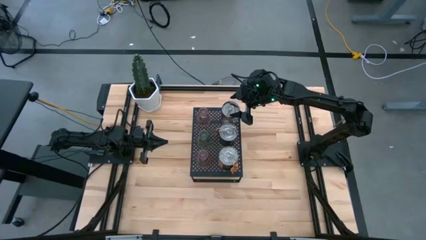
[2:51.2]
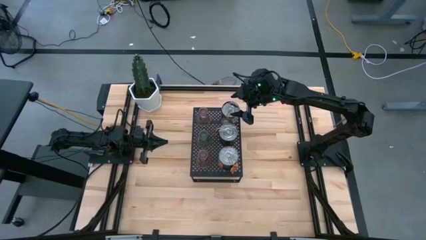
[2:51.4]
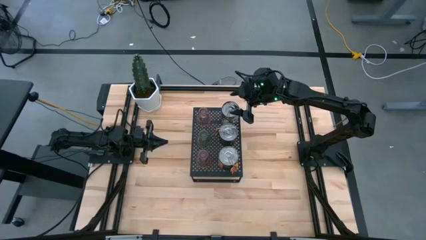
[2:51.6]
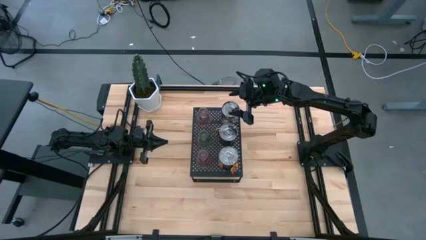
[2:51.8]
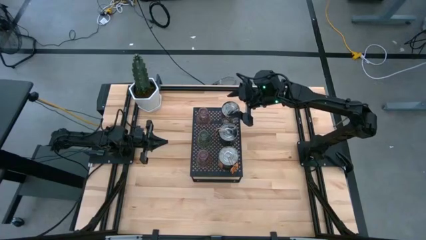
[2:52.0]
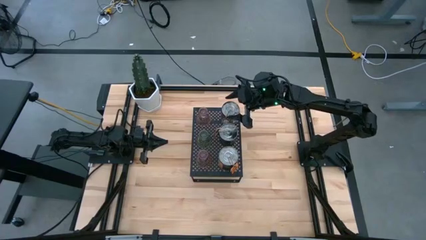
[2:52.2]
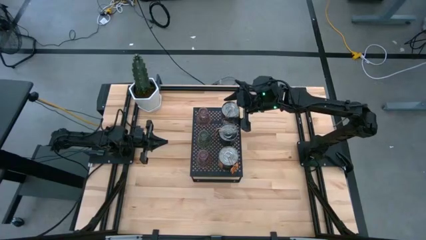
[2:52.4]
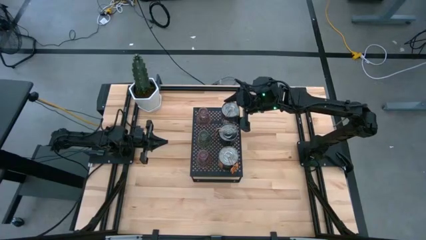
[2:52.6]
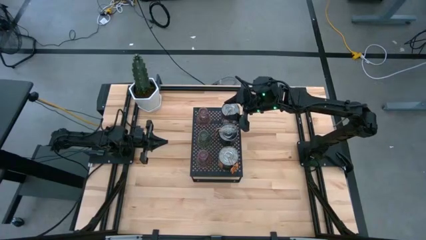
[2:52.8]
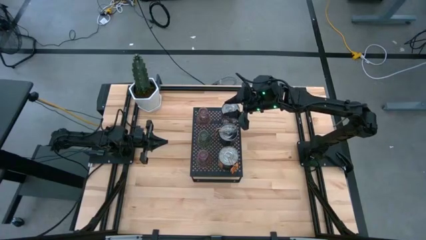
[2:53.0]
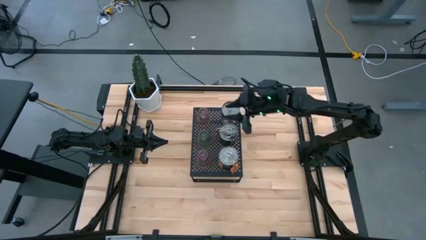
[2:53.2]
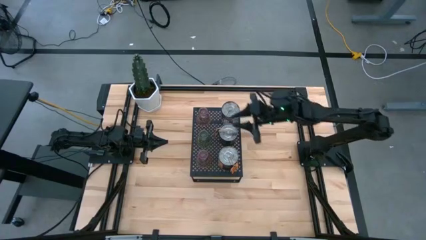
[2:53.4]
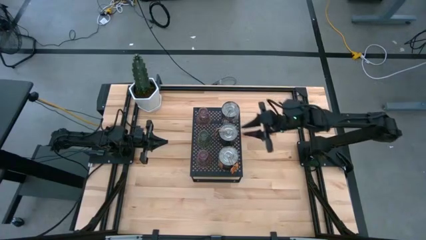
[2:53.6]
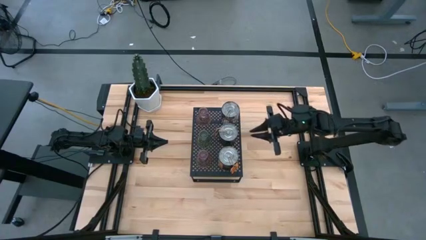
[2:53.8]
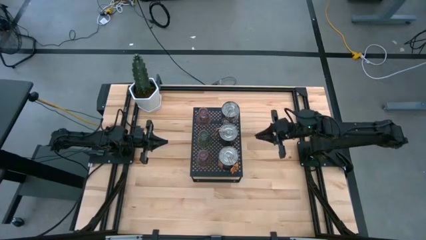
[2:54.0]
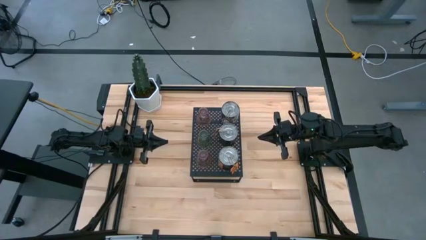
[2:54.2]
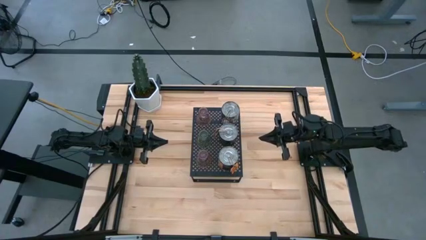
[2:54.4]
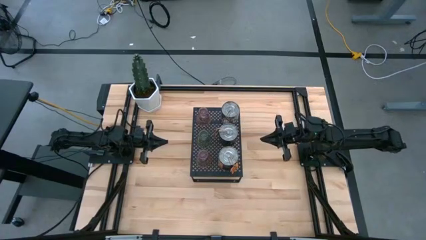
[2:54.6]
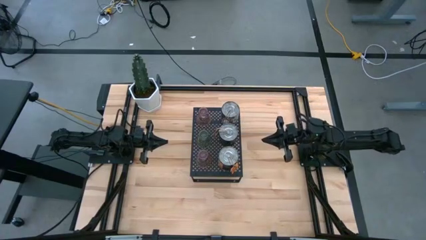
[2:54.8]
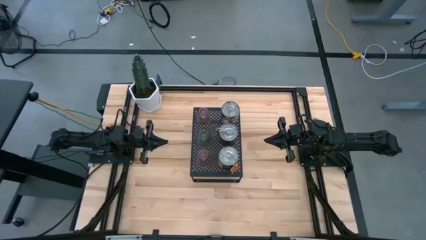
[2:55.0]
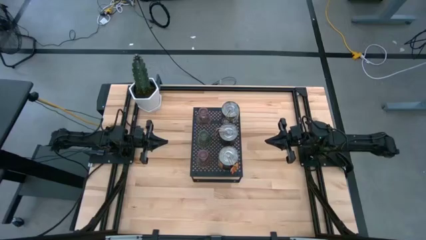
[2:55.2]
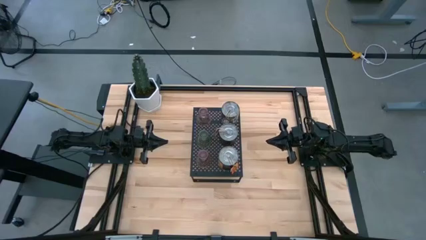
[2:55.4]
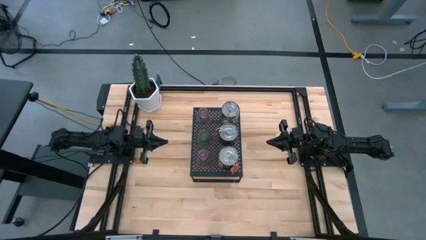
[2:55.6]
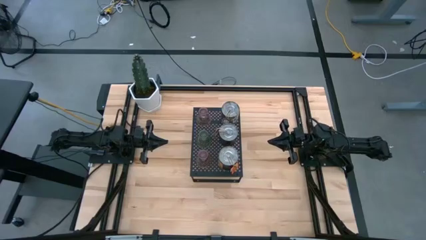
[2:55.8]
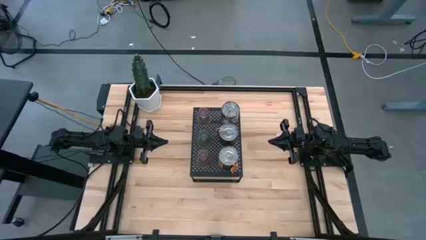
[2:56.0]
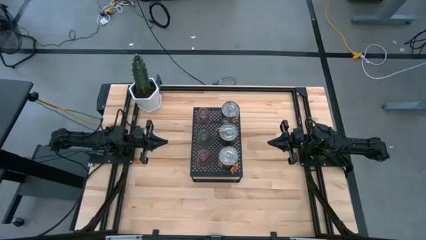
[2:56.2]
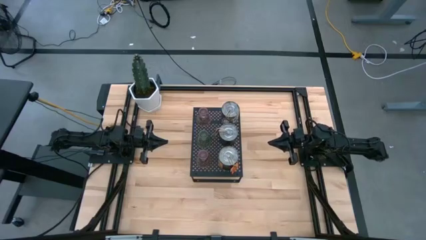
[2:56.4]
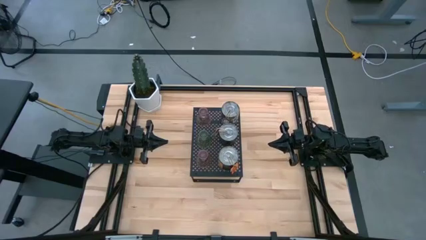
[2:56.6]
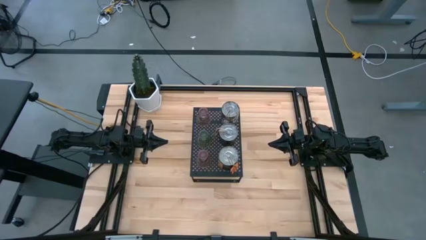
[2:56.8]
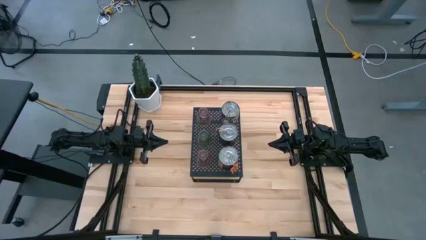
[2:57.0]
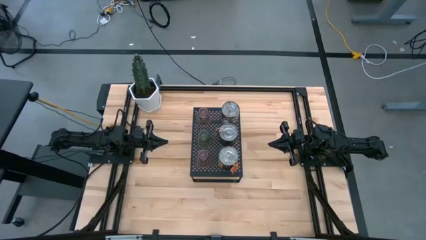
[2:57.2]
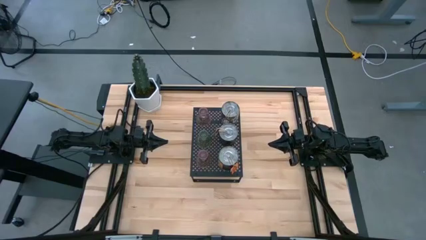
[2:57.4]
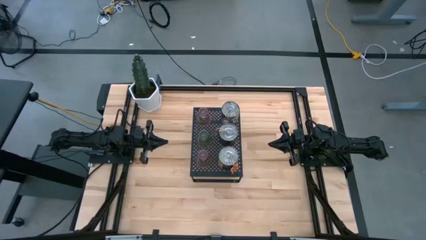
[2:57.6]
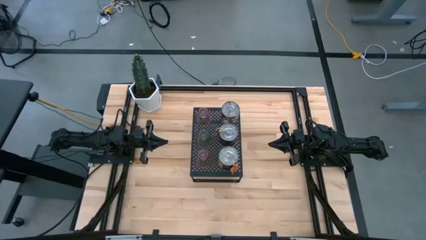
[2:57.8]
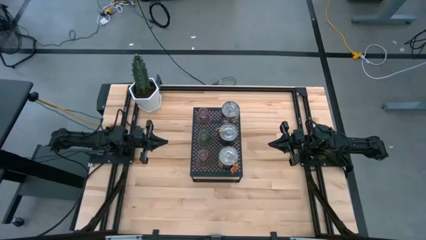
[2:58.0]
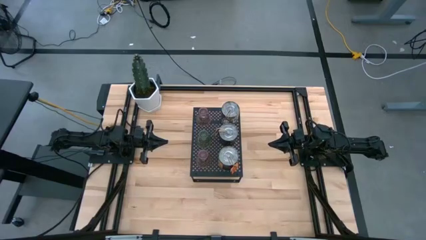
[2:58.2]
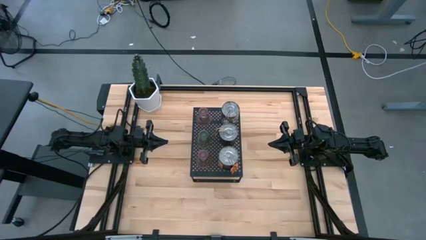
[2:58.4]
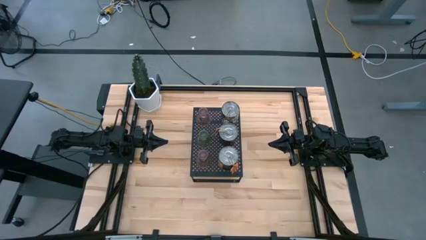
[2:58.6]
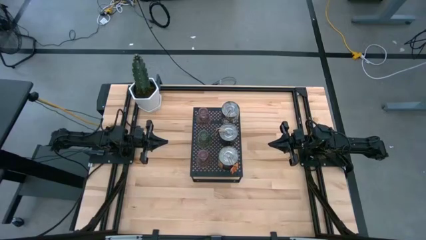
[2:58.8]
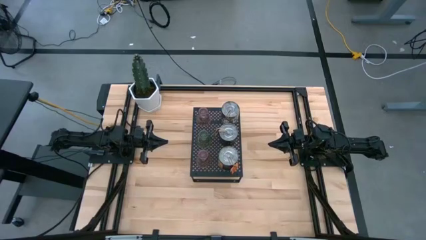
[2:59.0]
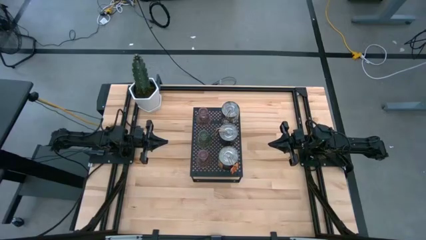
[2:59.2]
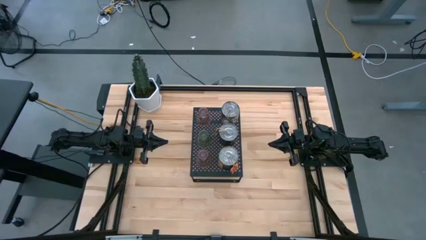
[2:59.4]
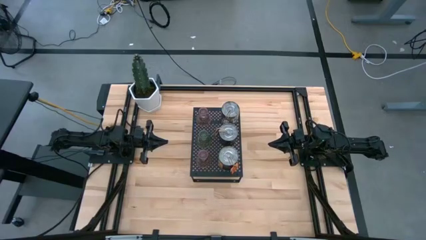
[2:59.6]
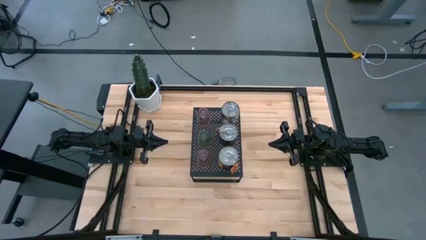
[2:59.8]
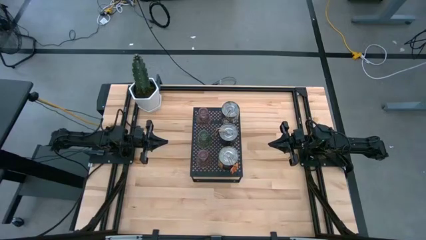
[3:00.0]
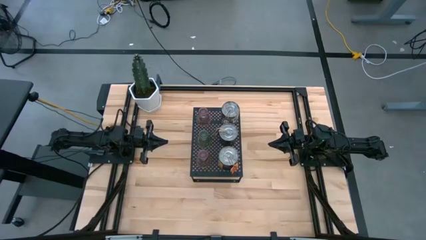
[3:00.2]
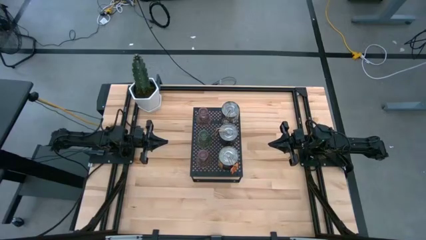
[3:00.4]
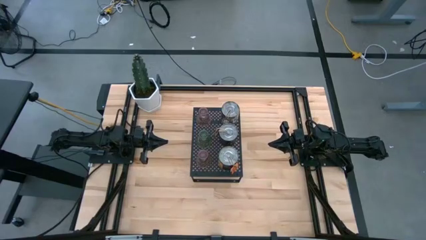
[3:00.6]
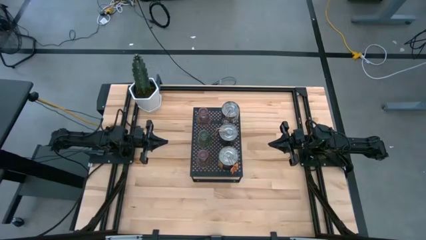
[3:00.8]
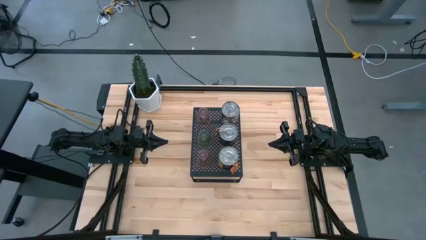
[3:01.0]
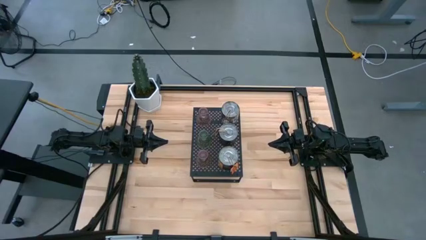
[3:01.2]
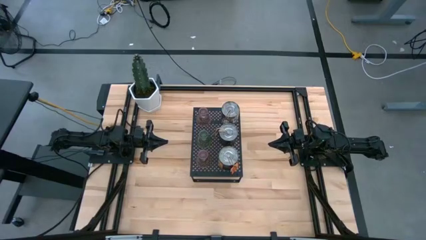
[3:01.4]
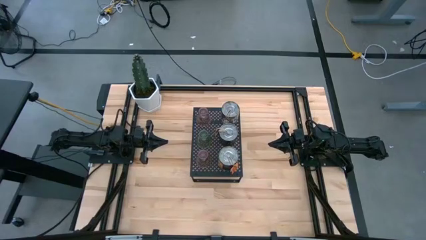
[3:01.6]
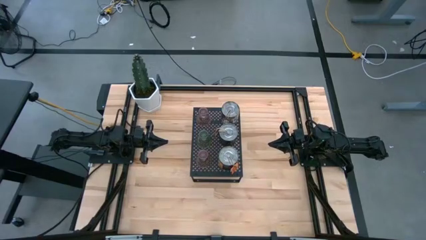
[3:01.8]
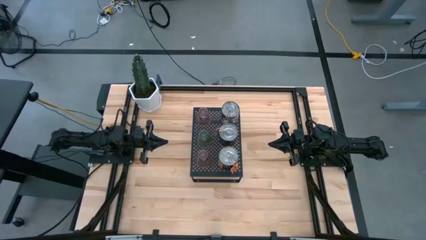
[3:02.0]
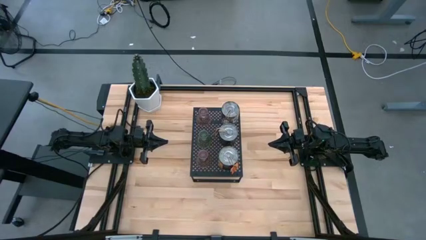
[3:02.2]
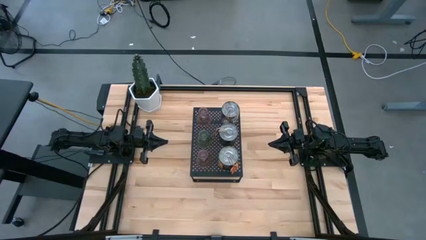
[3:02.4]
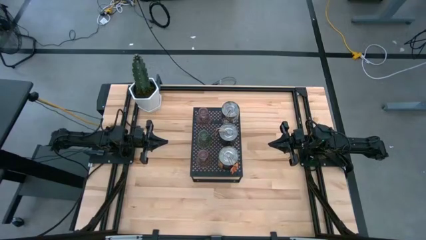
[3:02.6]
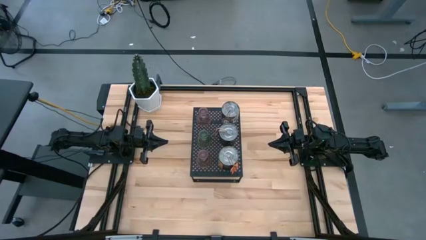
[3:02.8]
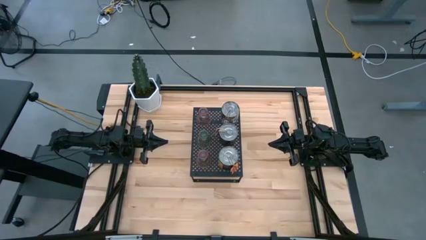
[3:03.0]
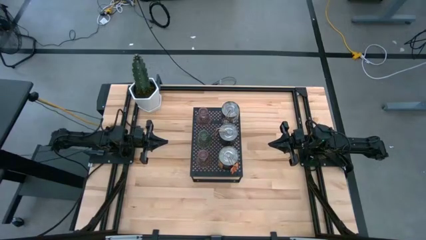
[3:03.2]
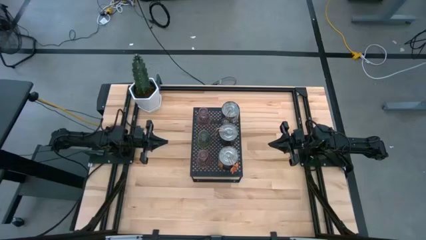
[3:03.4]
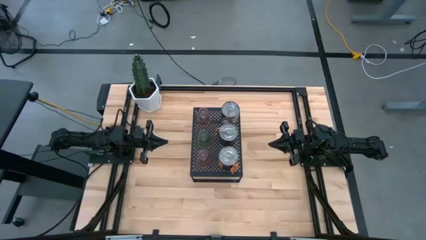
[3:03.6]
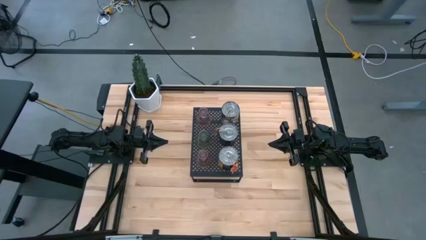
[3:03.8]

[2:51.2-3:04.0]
Task: Pick & Place candle stick holders
Return to Home Position

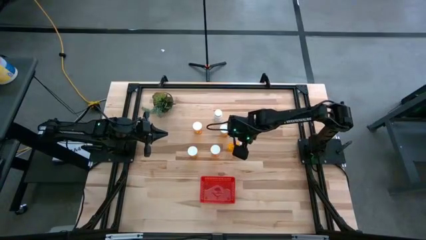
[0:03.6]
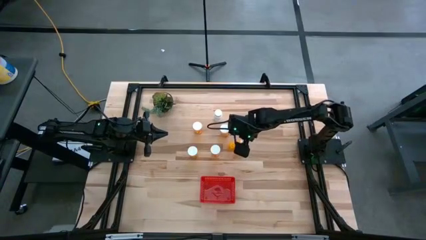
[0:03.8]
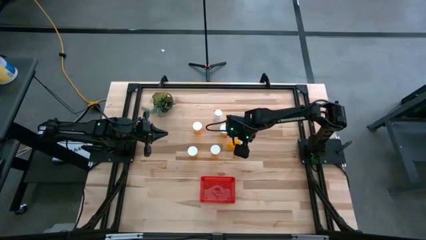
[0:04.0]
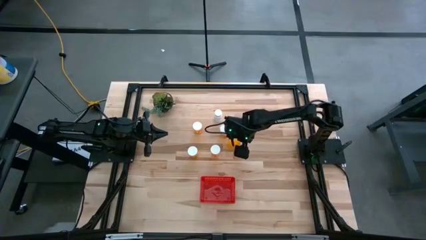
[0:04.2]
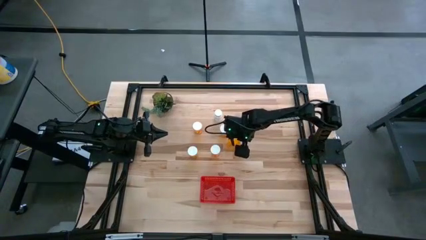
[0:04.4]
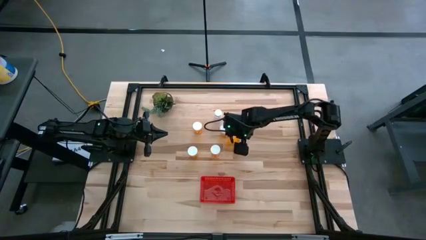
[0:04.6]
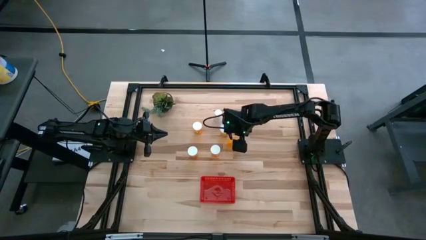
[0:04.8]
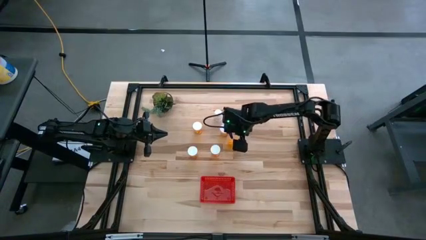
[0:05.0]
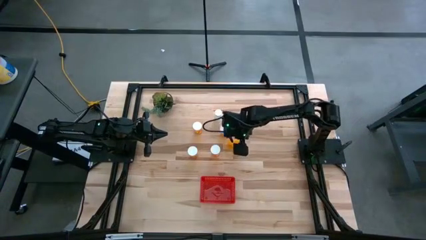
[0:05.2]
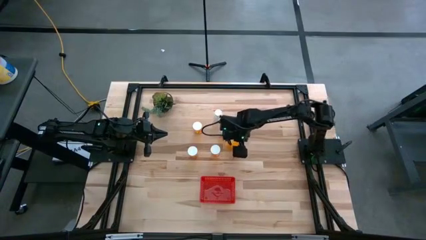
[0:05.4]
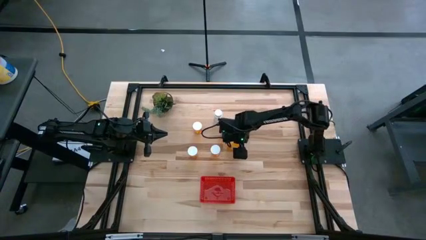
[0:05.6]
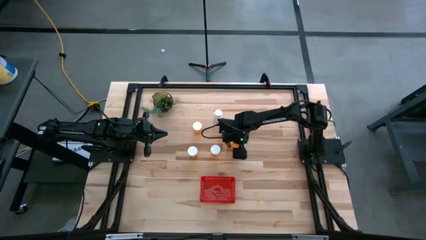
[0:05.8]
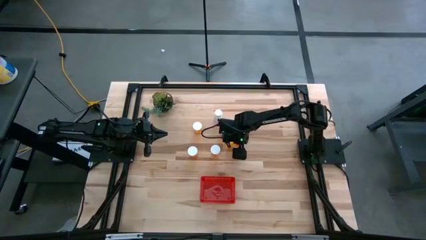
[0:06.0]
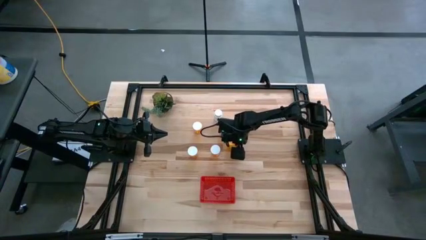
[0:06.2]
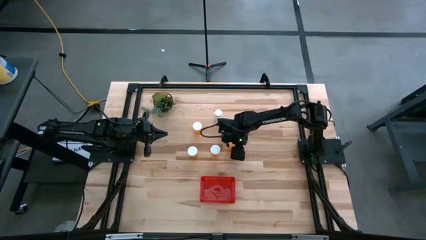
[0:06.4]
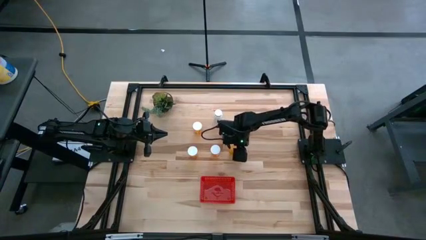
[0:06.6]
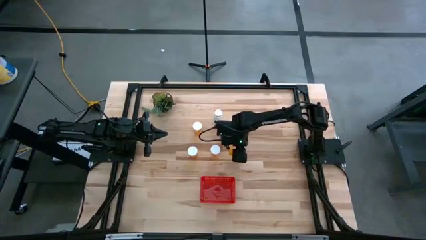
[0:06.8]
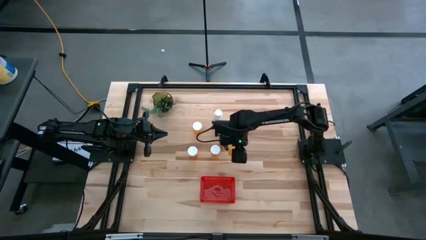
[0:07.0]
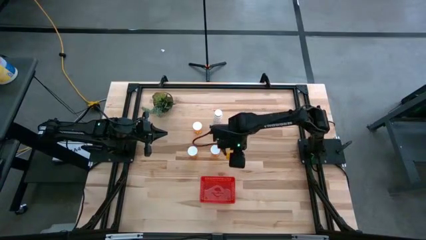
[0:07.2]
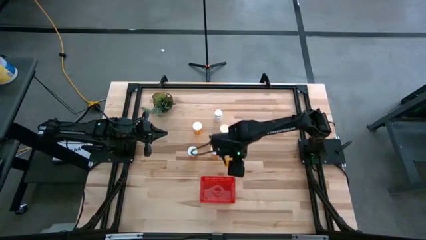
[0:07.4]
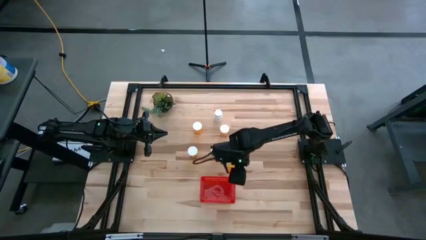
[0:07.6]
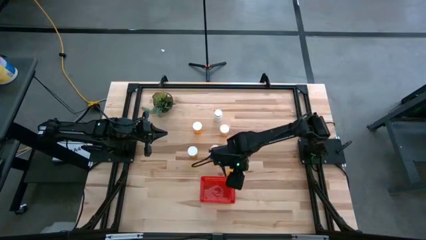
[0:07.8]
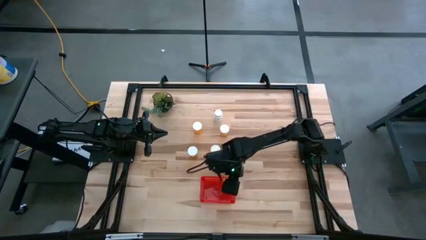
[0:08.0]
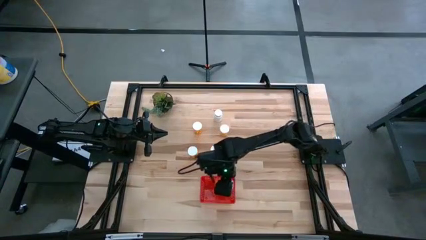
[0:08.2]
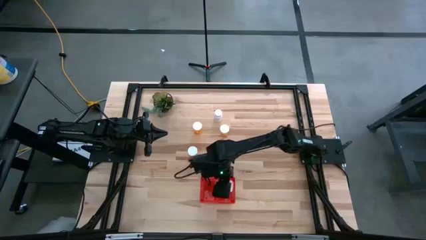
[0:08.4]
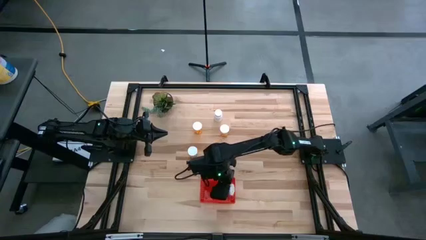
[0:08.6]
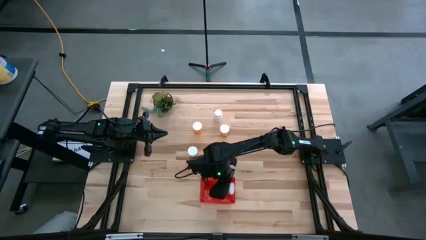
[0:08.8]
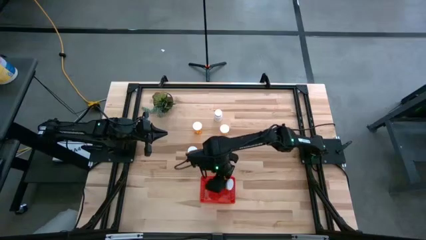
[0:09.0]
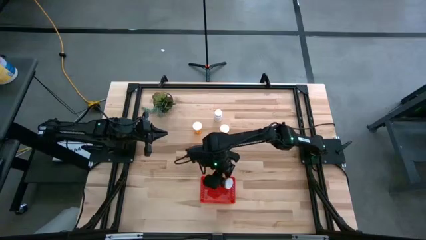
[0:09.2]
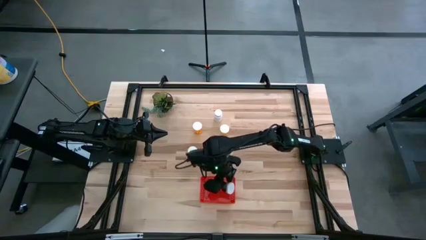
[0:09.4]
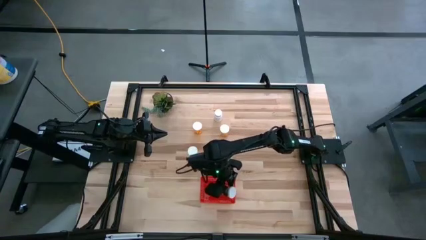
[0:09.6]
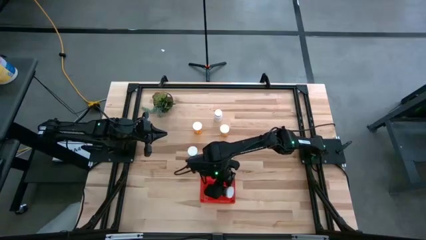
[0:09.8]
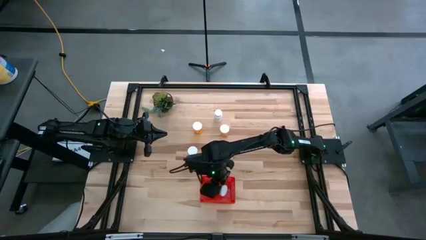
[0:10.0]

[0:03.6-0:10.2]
Task: Pick and place pill bottles into a basket
Put the orange pill bottle into the red bin
